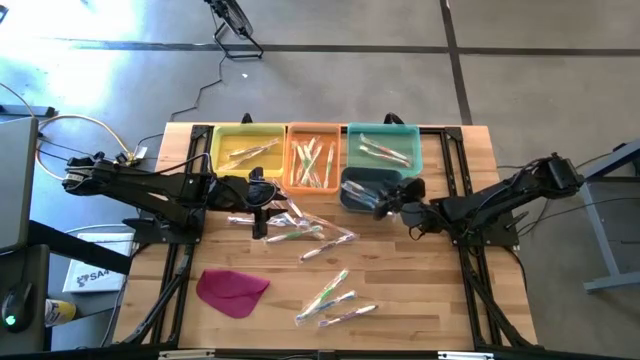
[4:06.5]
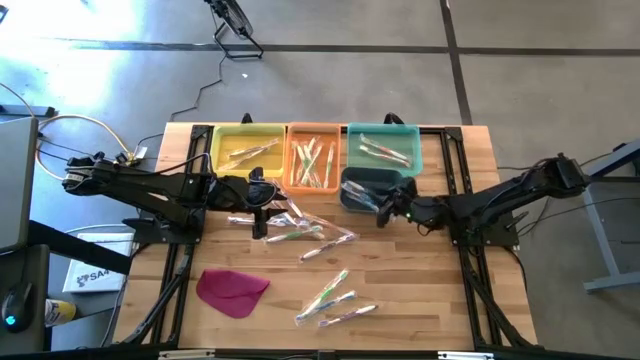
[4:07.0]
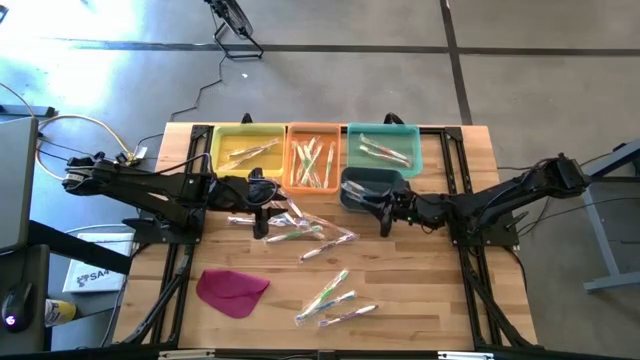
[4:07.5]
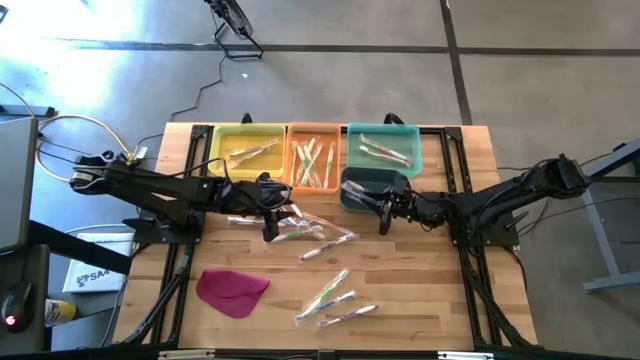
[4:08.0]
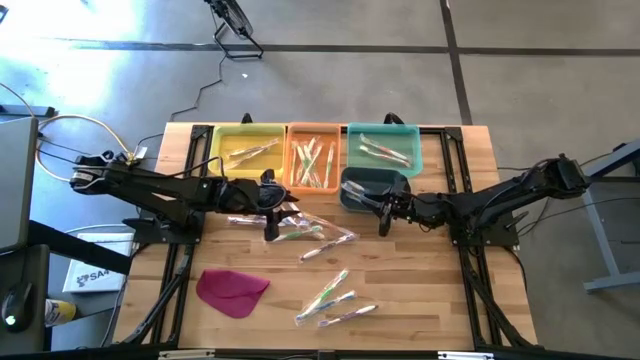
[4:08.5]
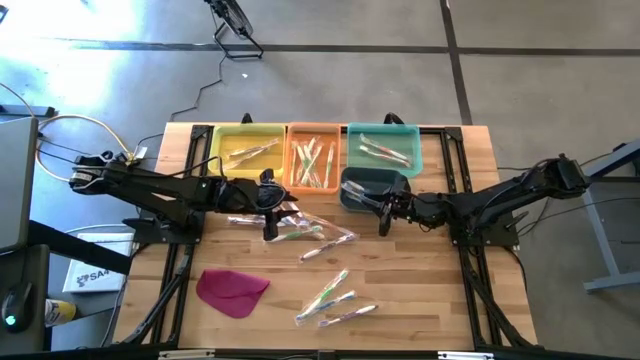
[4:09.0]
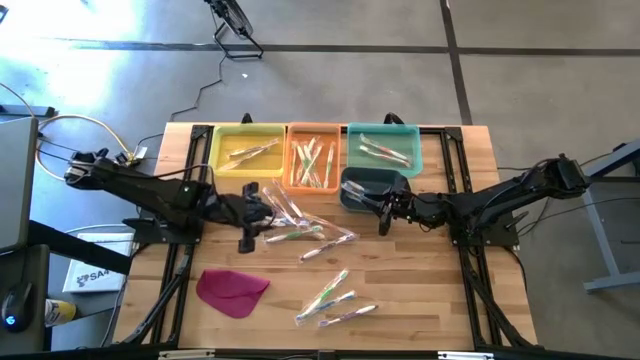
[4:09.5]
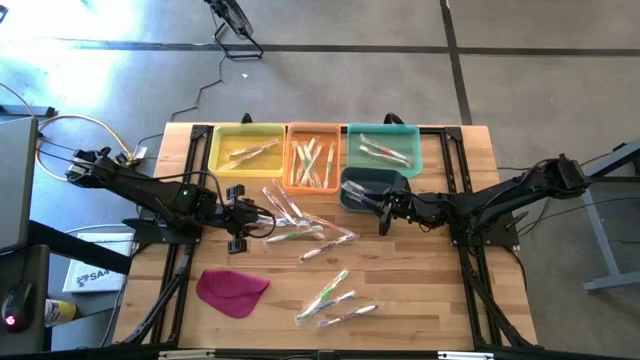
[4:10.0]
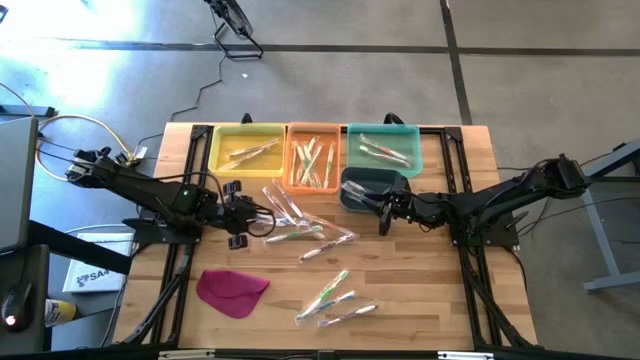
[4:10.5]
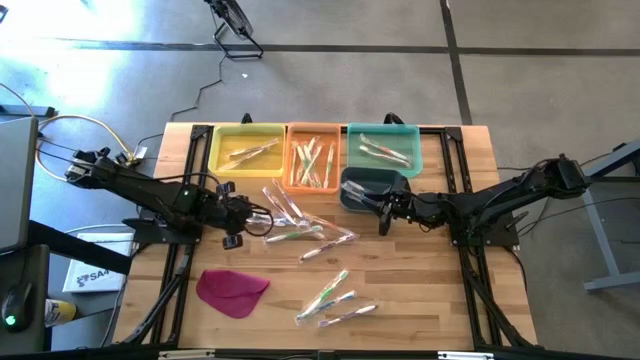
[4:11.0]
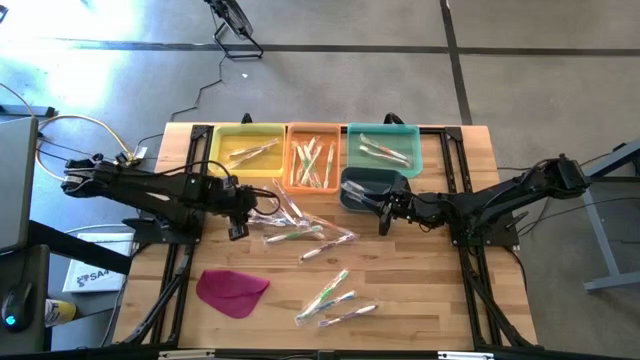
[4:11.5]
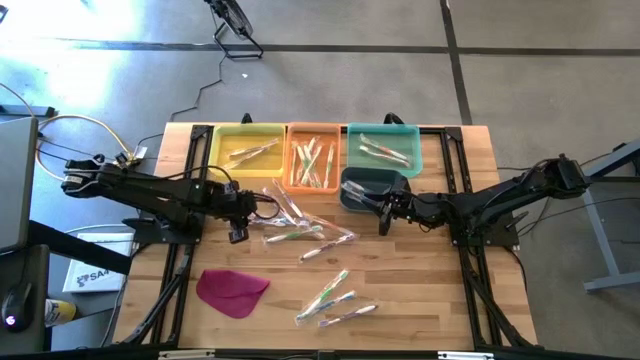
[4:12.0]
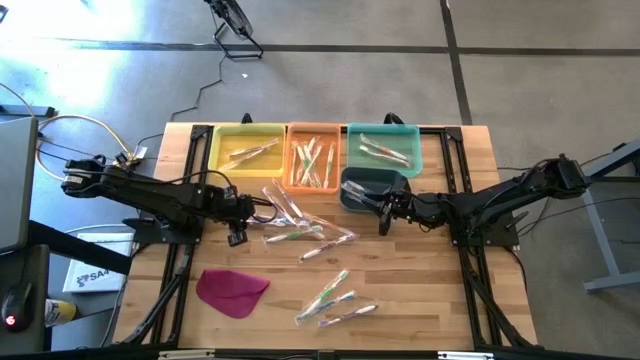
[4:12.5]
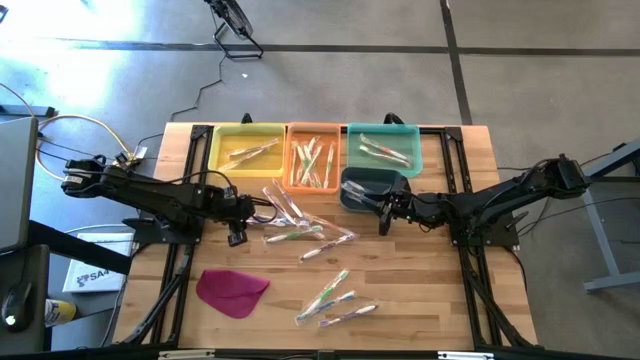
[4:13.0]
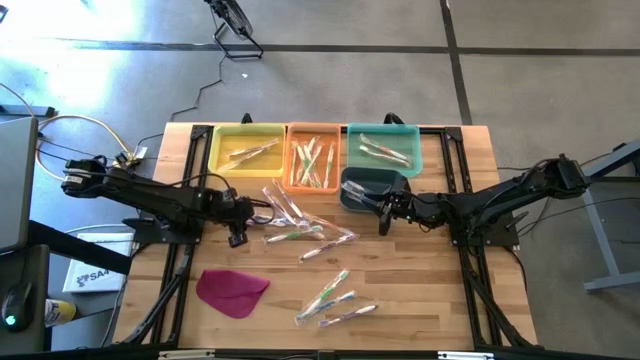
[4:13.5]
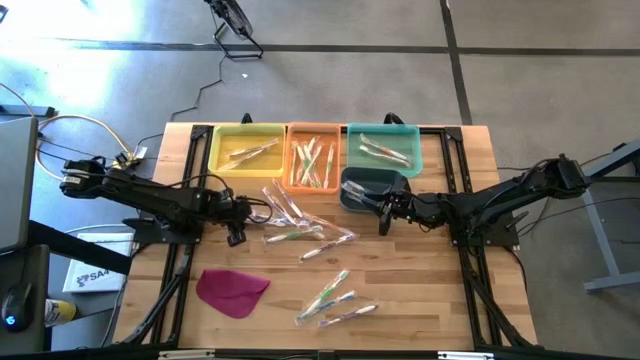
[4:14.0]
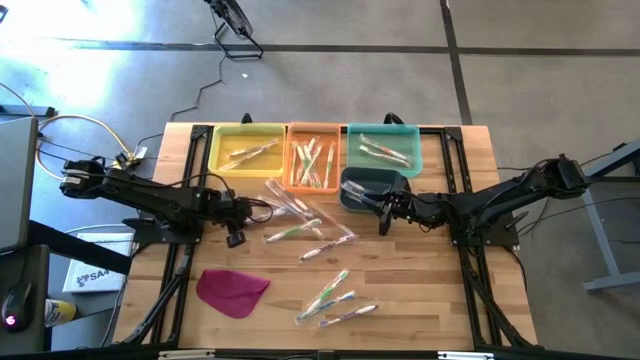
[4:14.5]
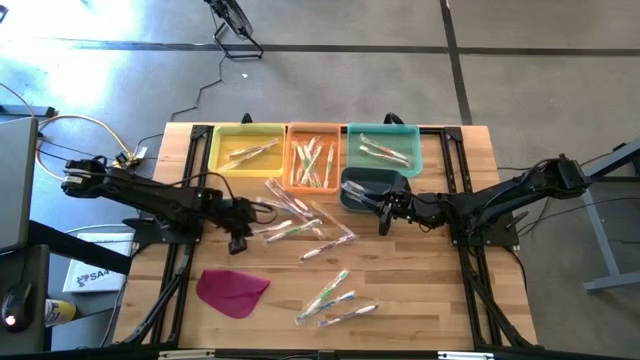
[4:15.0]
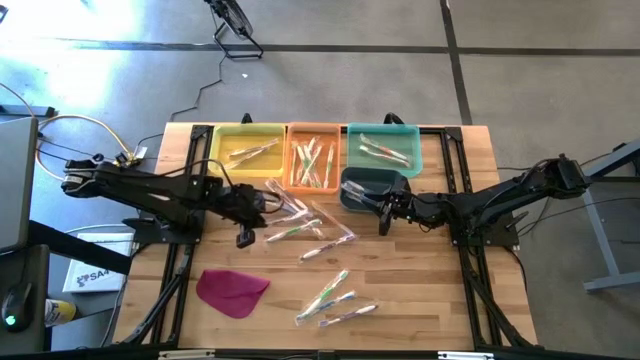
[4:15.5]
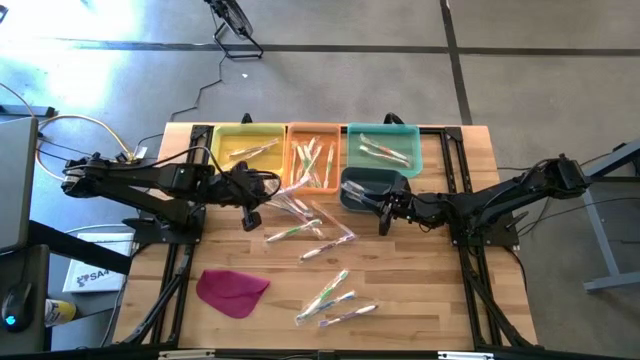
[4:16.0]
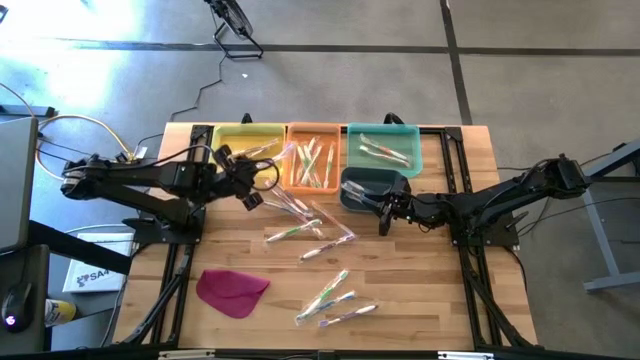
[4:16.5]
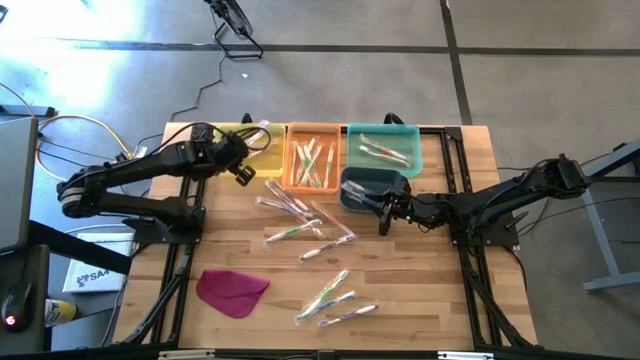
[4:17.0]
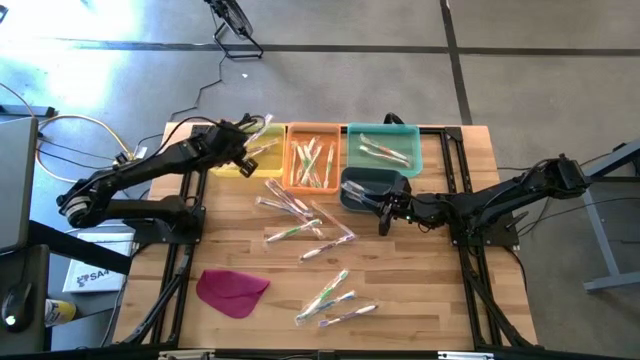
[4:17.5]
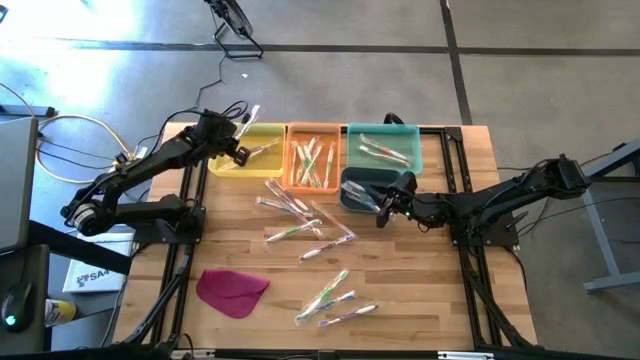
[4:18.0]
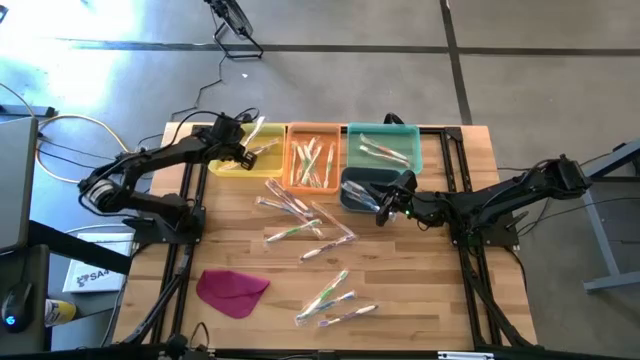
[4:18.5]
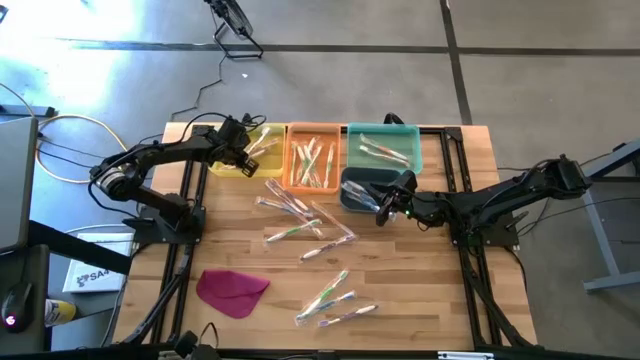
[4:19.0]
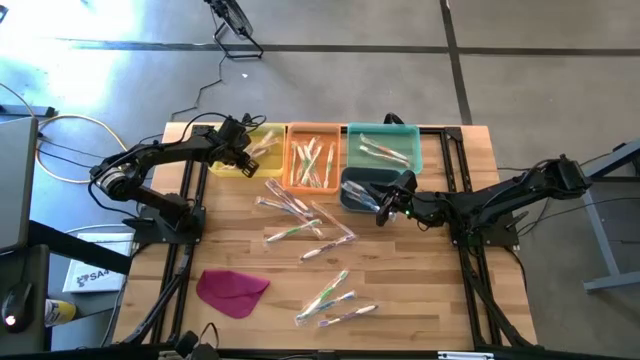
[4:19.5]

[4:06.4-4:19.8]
Task: Pick & Place Toothbrushes
Put the violet toothbrush into the yellow bin

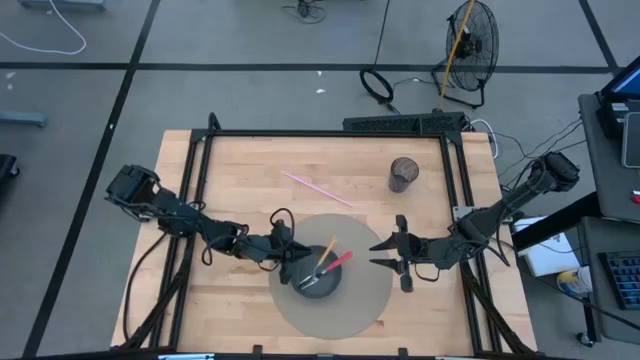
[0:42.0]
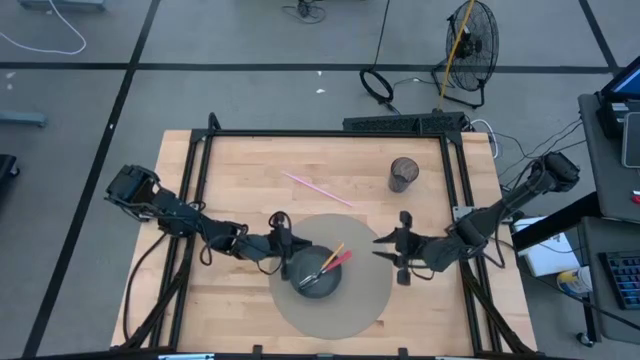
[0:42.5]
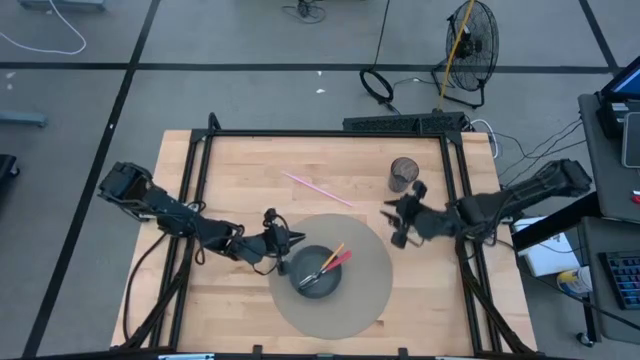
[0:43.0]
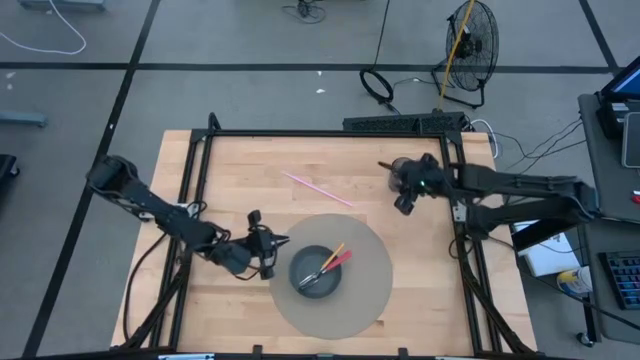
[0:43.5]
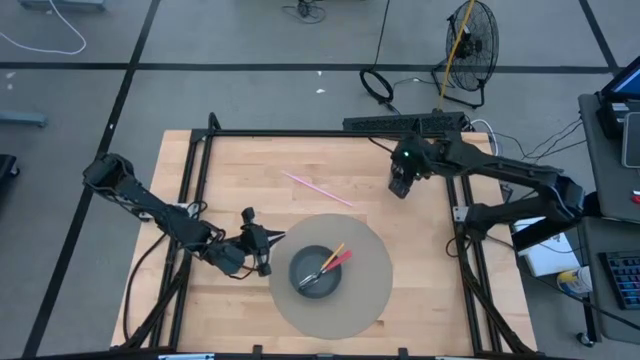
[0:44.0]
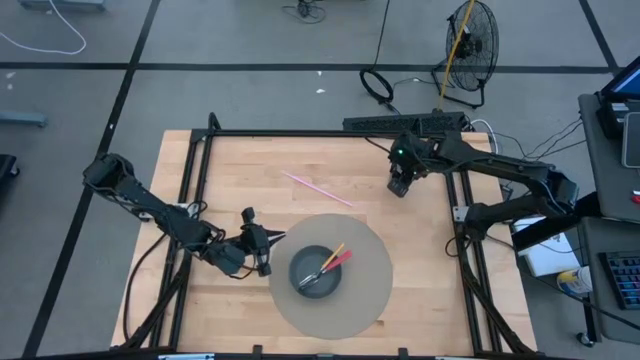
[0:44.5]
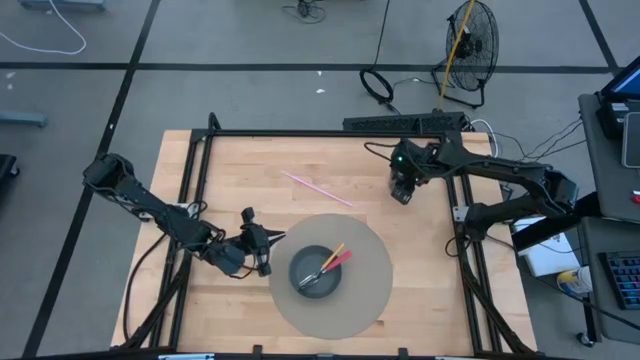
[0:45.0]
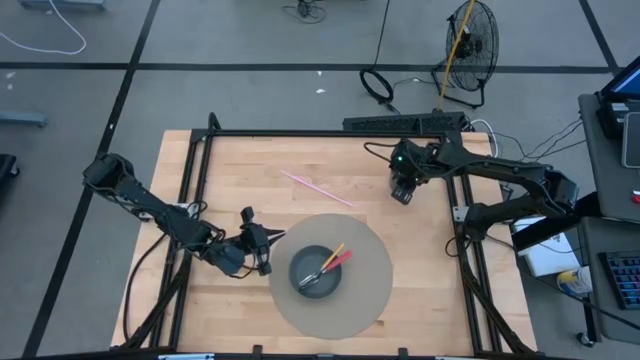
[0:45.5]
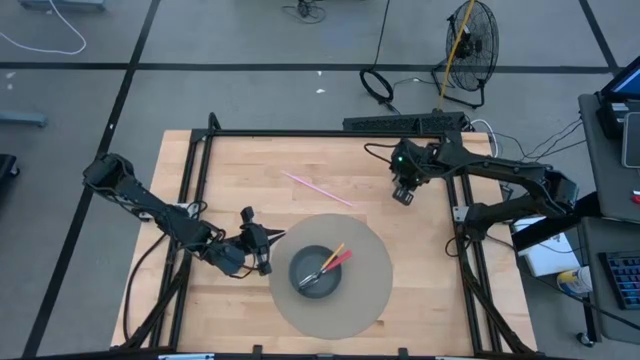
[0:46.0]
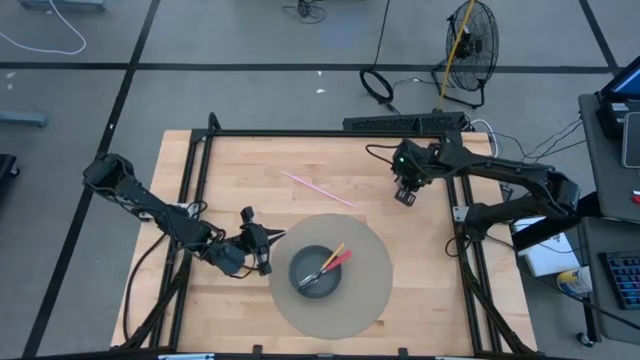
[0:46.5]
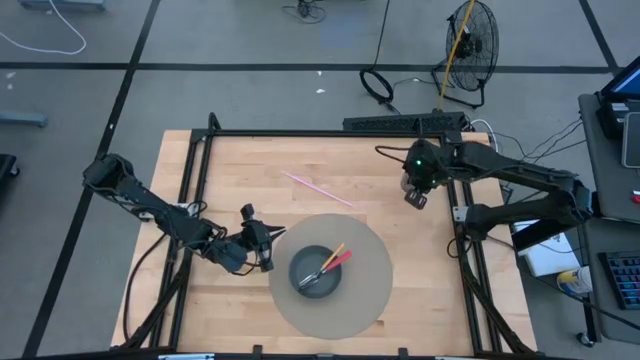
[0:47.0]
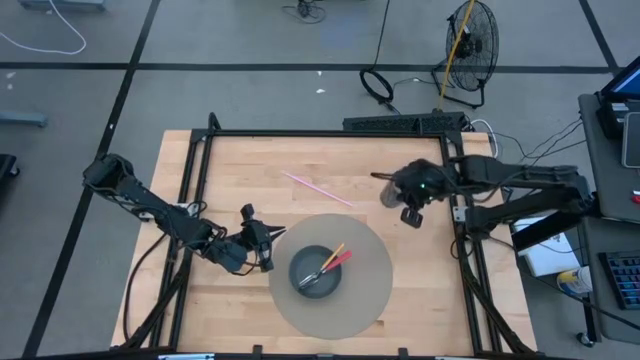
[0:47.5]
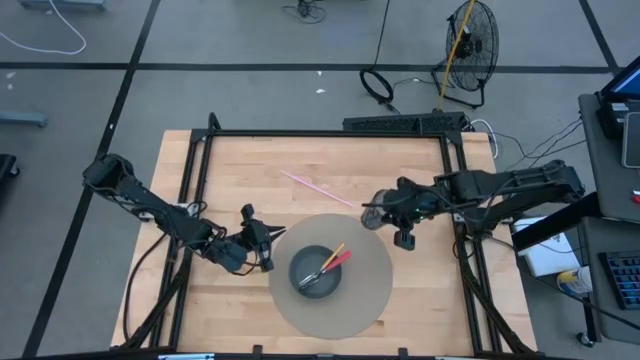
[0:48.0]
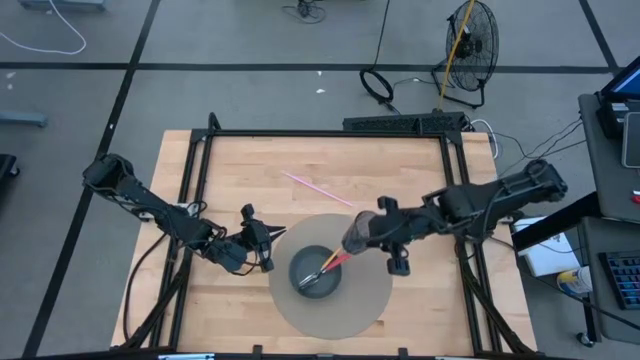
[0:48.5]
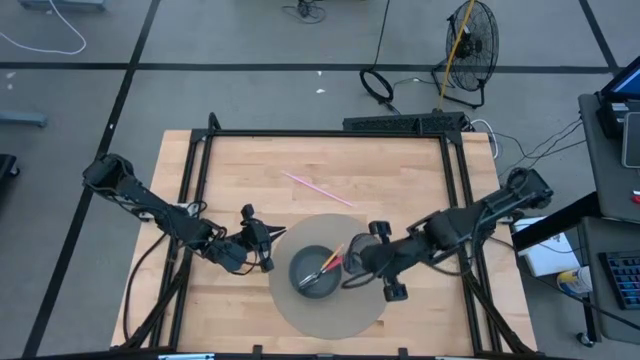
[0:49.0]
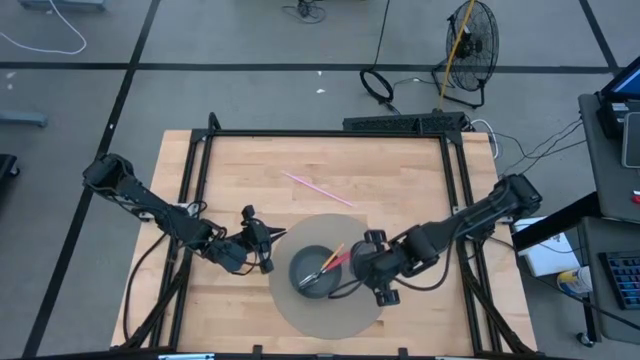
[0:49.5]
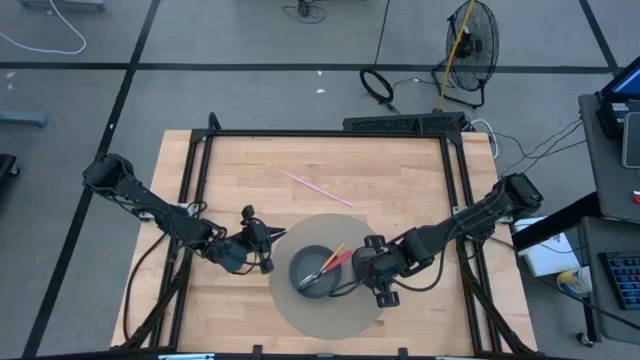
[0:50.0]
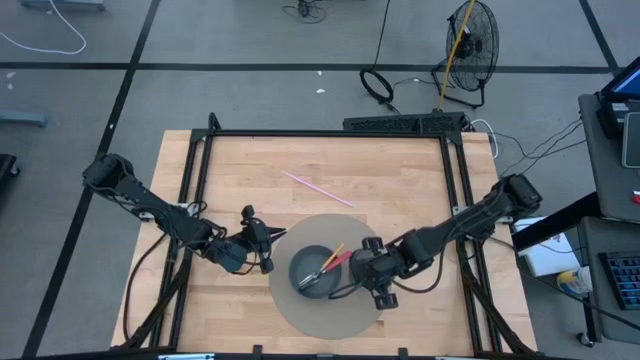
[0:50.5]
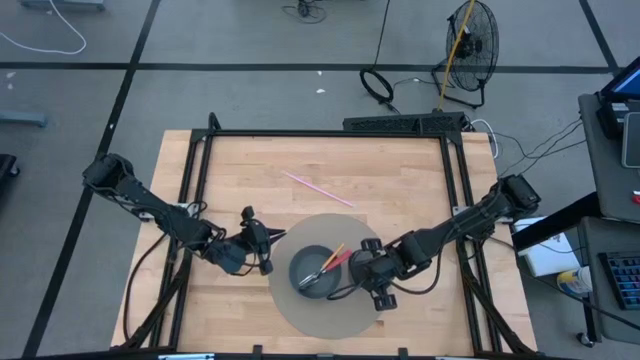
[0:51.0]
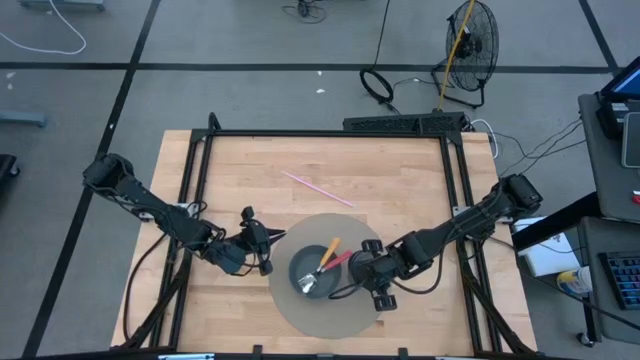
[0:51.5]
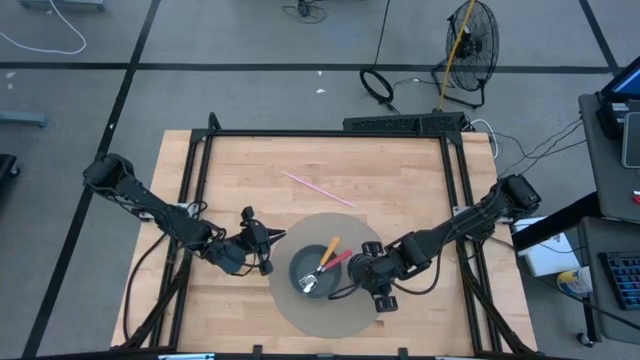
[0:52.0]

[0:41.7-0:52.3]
Task: Pick & Place Utensil
Put the blue cup on the brown placemat to the right of the blue bowl
